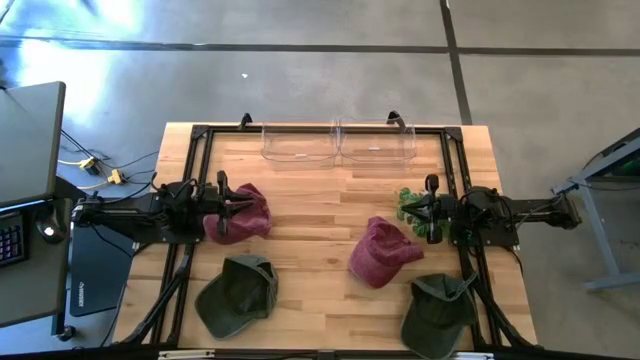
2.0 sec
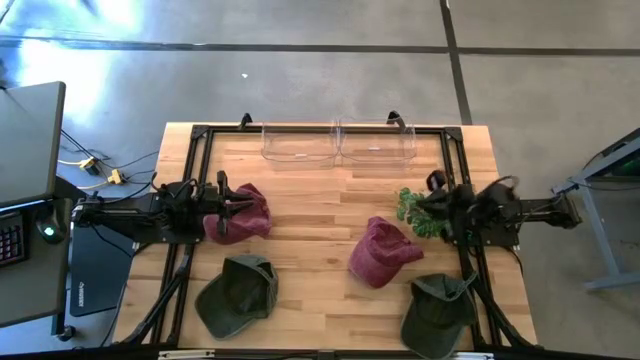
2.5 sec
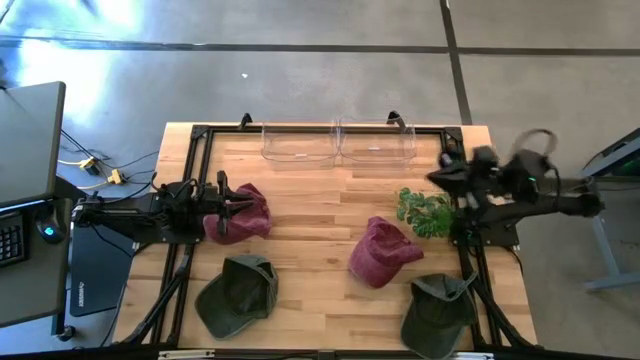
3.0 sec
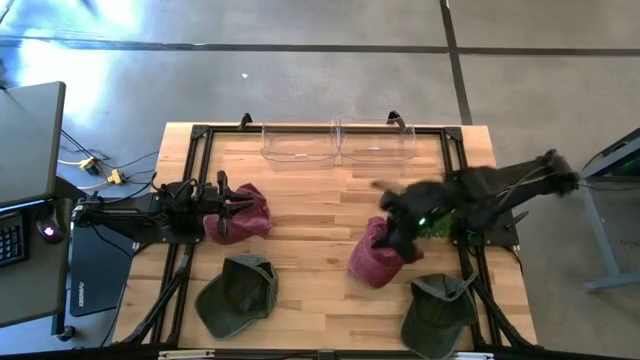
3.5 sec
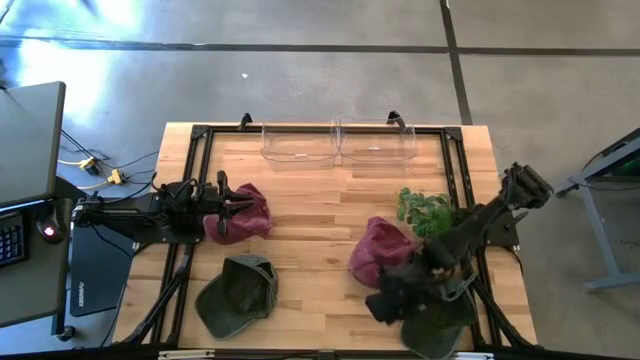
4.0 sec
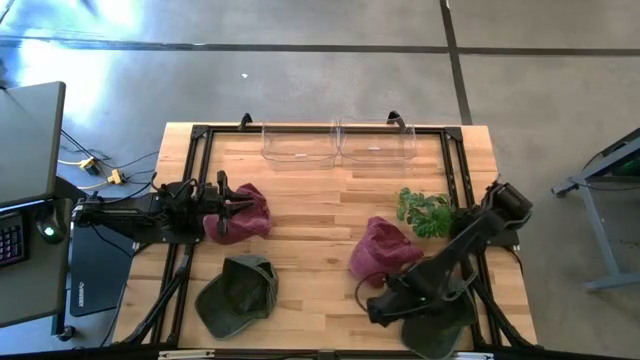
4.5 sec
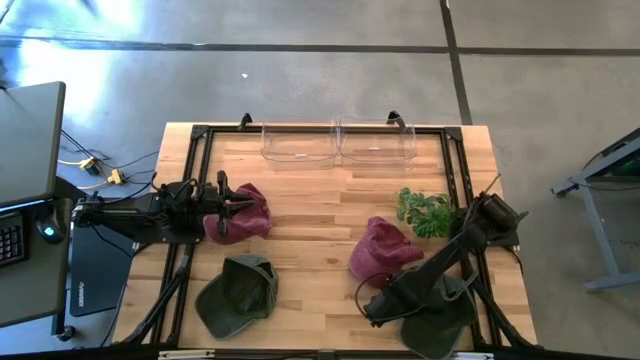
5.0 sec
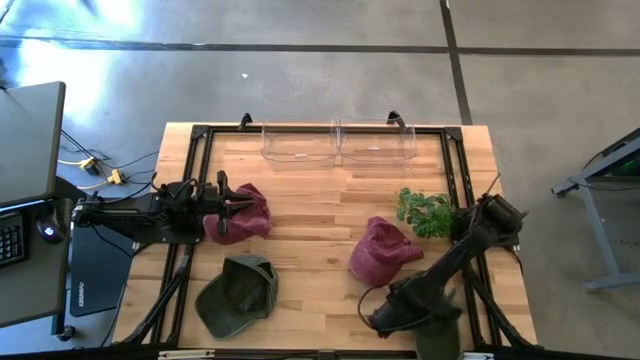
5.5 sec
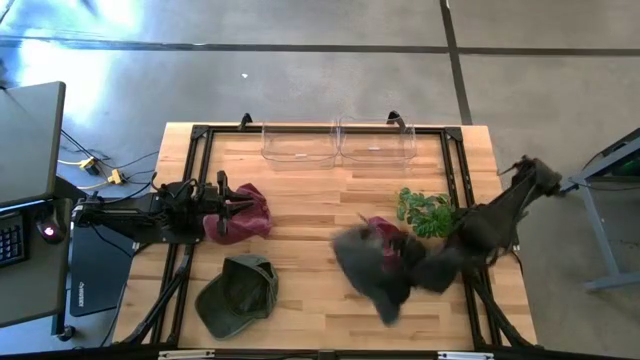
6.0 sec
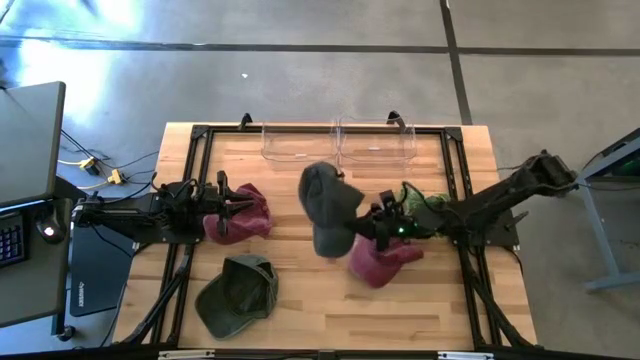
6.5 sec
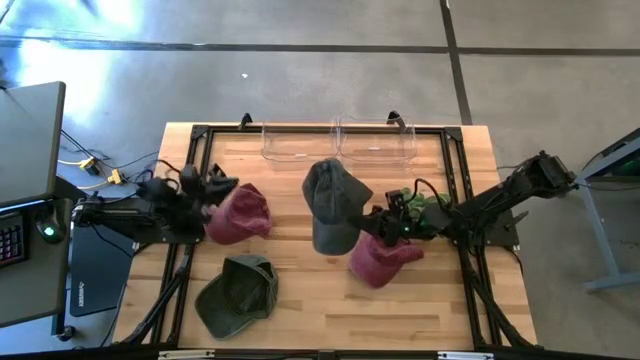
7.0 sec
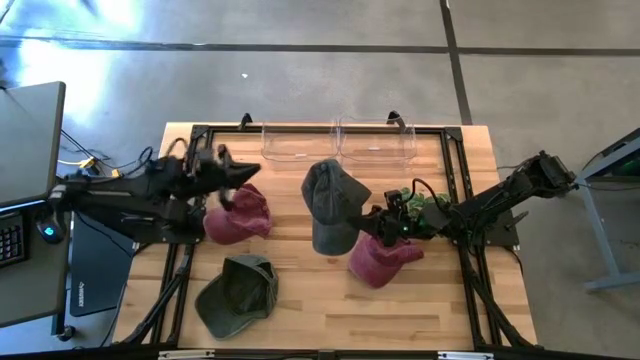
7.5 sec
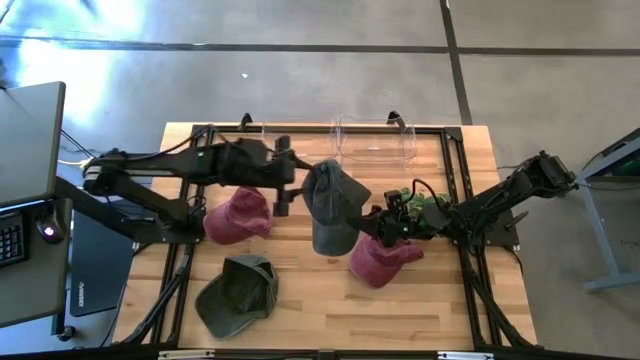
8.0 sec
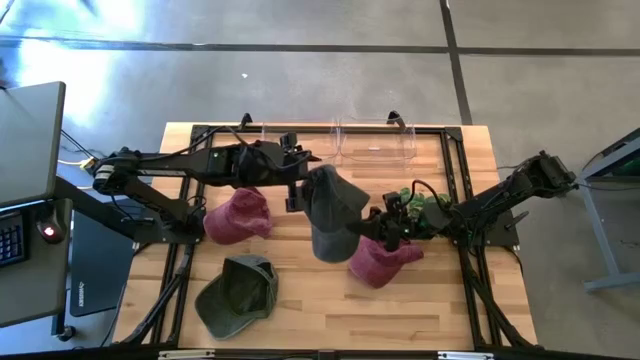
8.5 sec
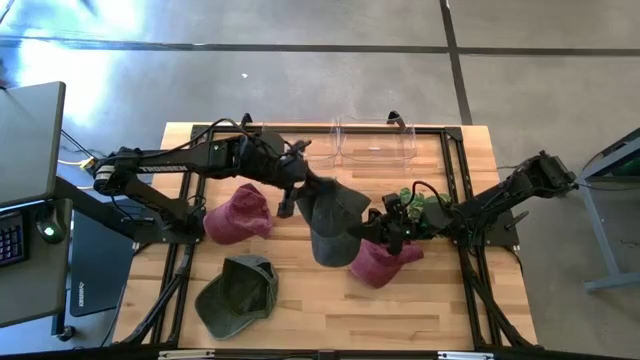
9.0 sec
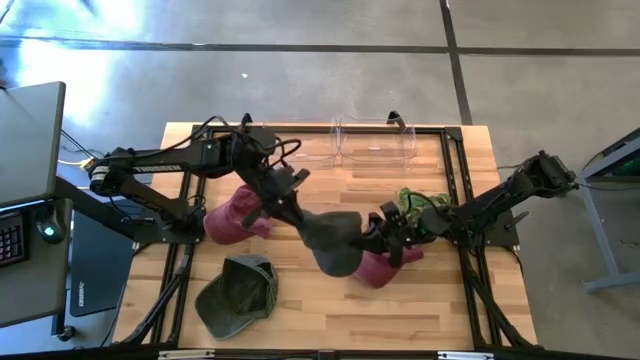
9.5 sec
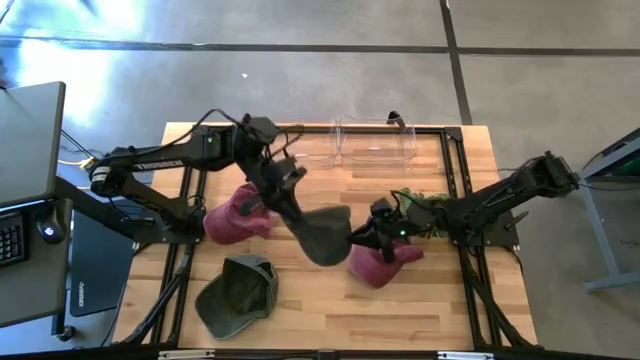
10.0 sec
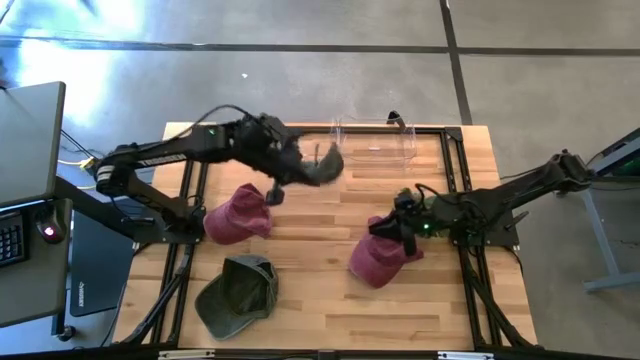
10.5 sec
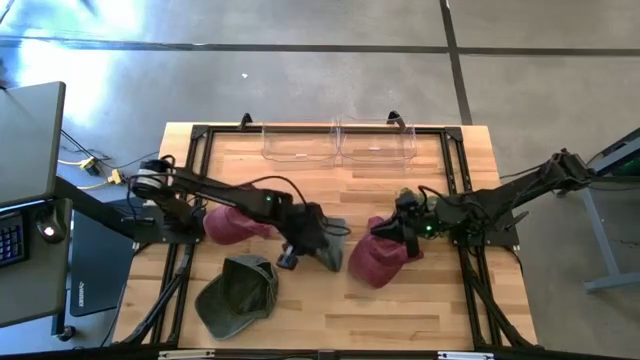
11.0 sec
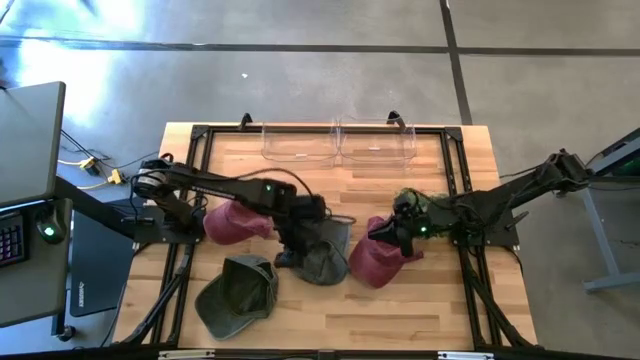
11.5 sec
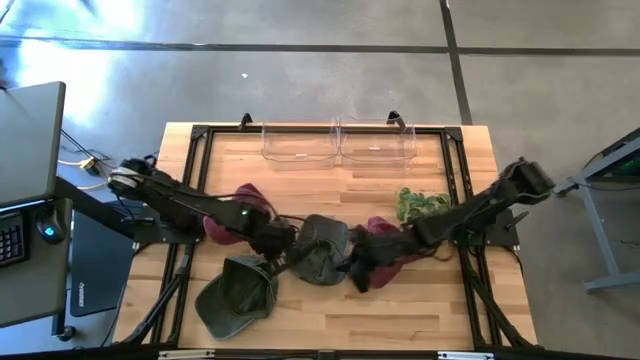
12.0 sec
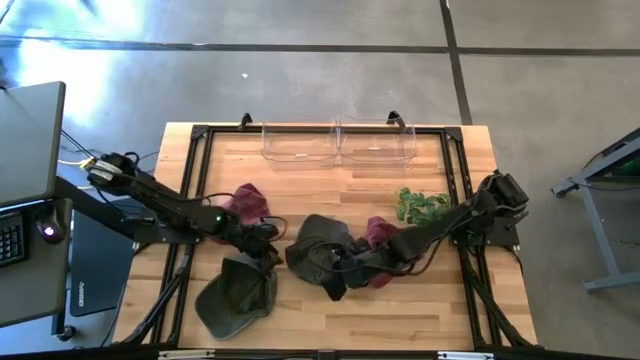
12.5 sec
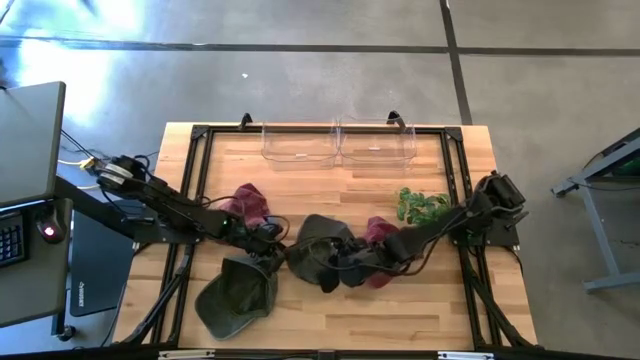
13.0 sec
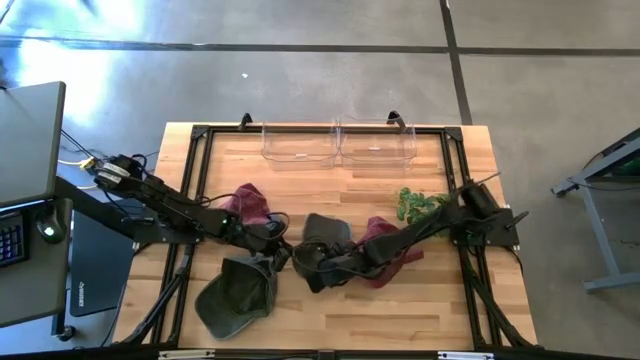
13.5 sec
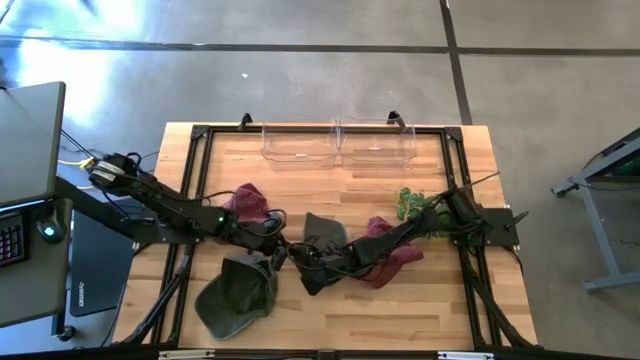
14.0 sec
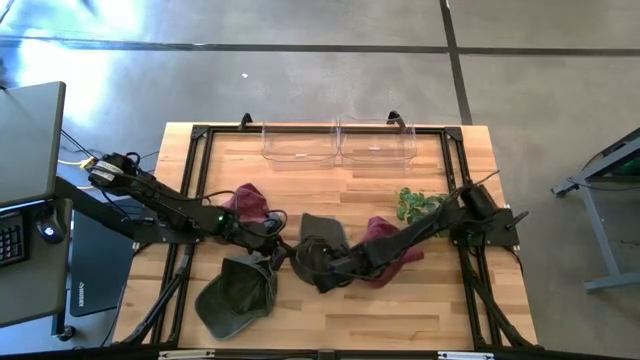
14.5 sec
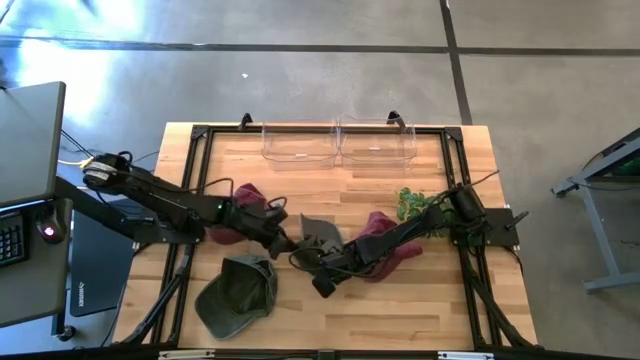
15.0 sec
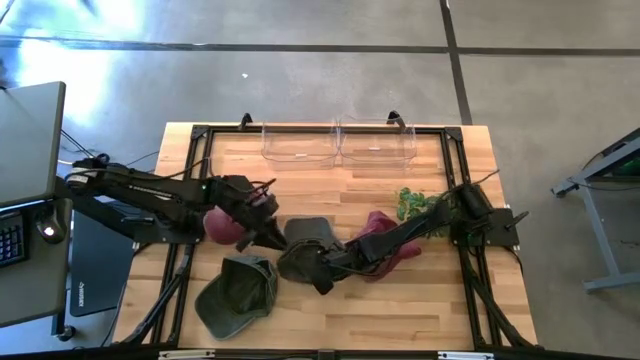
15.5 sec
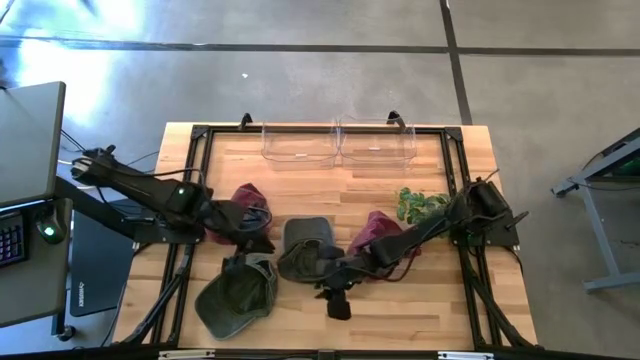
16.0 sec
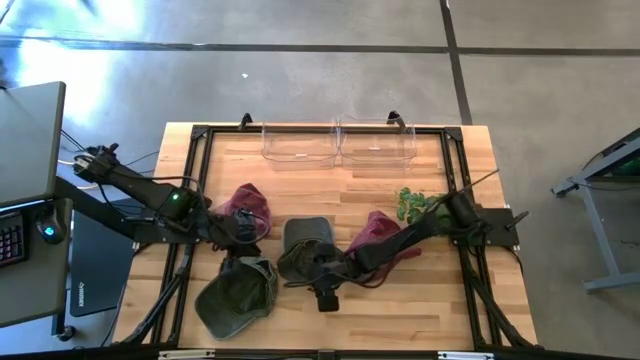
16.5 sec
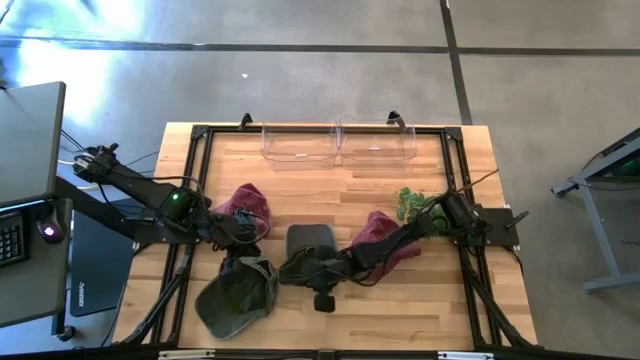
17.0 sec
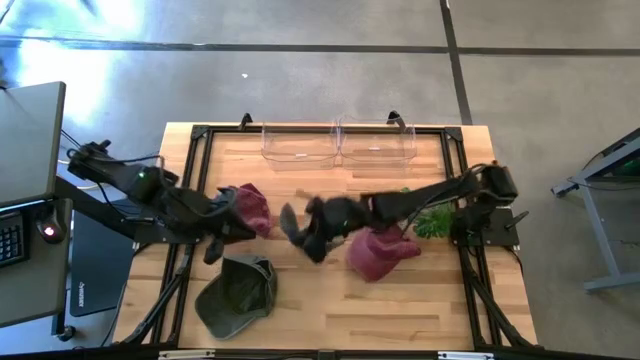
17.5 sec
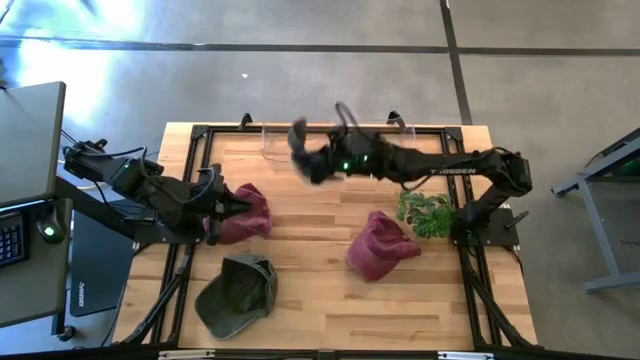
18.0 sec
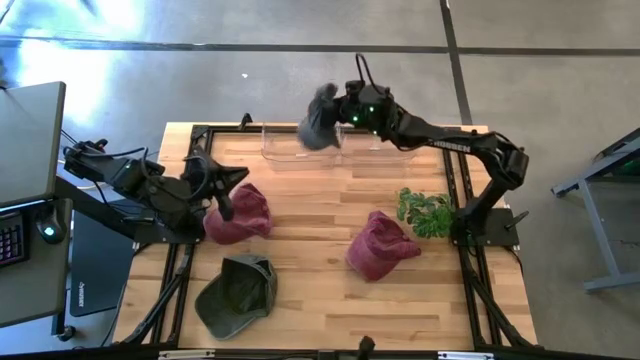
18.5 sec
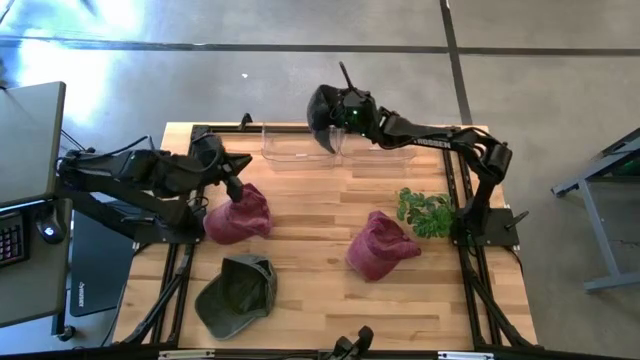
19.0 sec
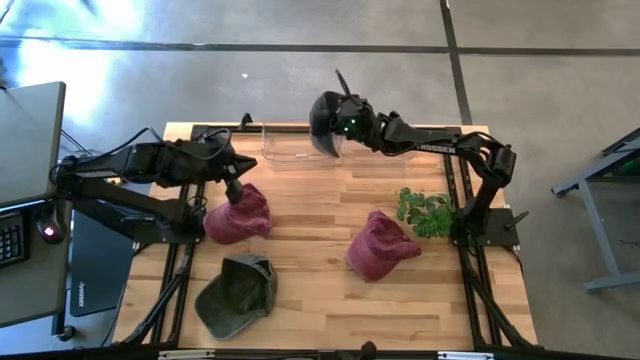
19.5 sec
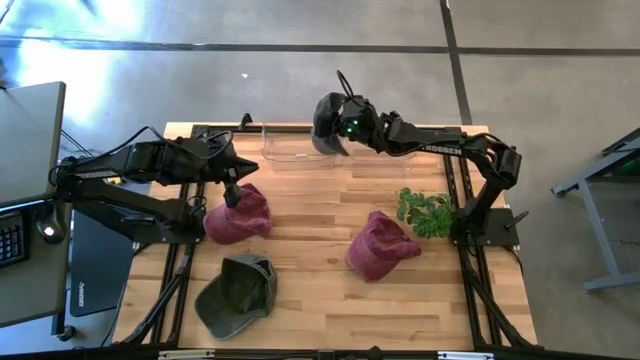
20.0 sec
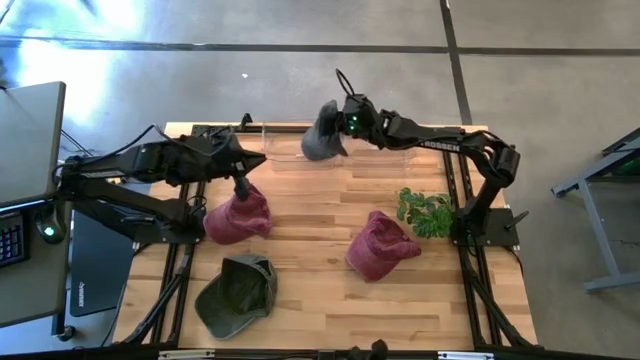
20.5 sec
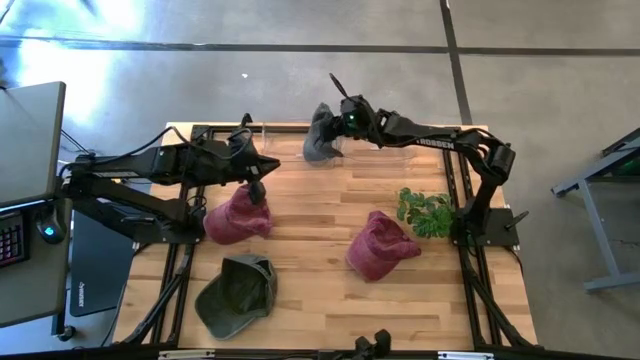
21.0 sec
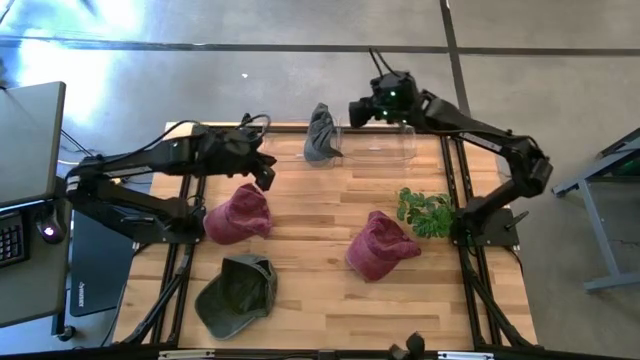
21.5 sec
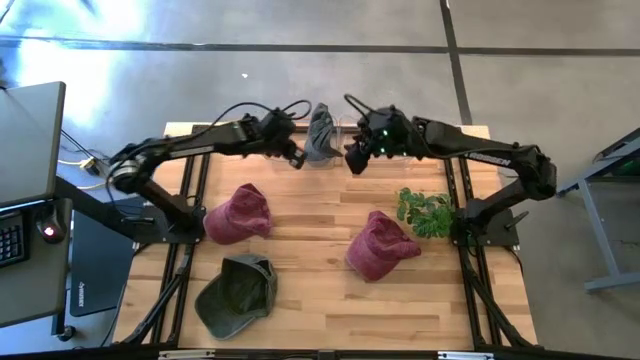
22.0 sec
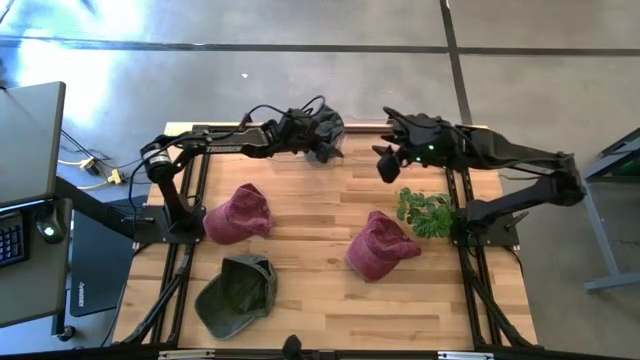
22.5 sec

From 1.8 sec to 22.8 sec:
Task: Pick & Place hat
Put the right gray cap into the left transparent bin

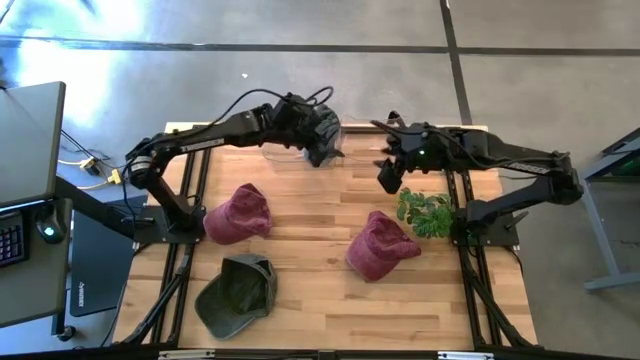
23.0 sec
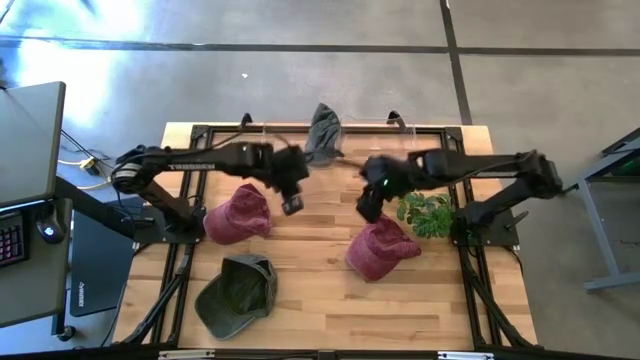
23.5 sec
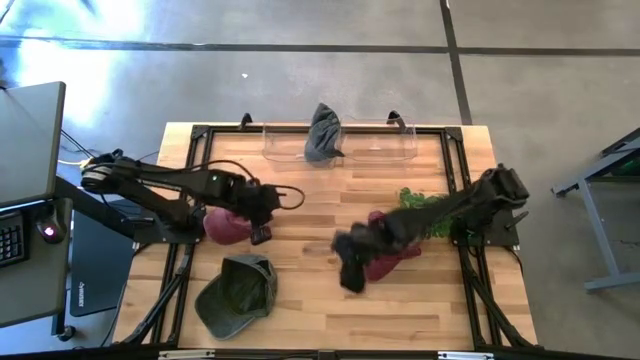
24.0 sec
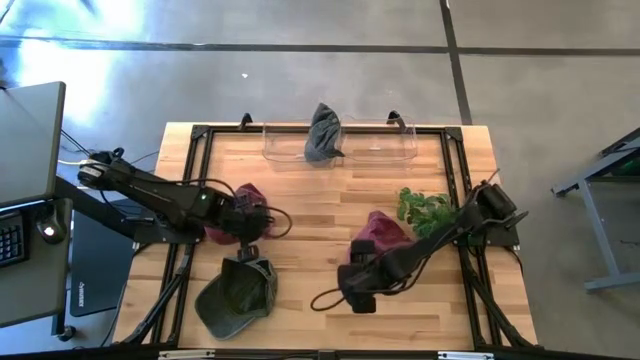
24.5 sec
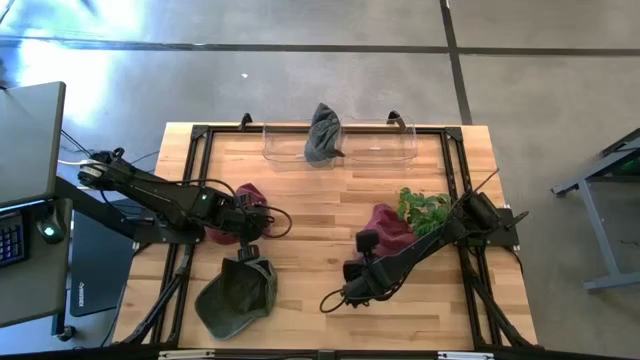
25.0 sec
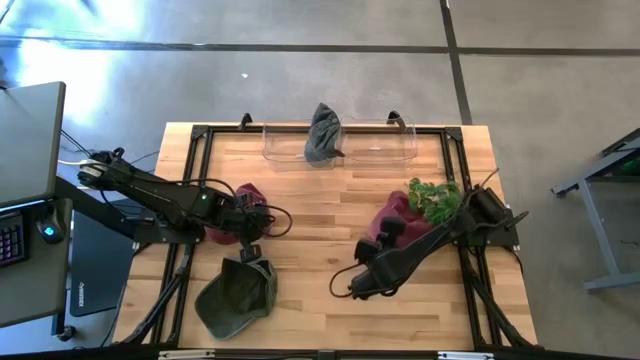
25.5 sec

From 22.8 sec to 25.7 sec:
Put the right red cap into the right transparent bin
